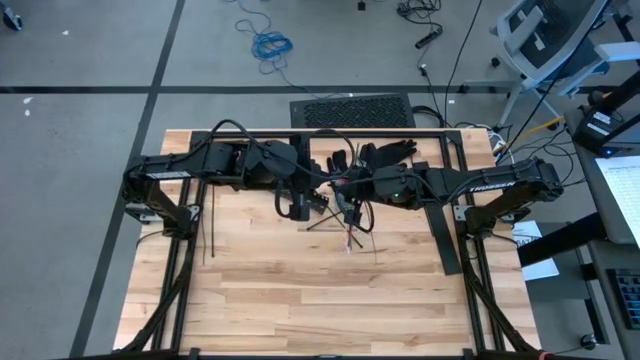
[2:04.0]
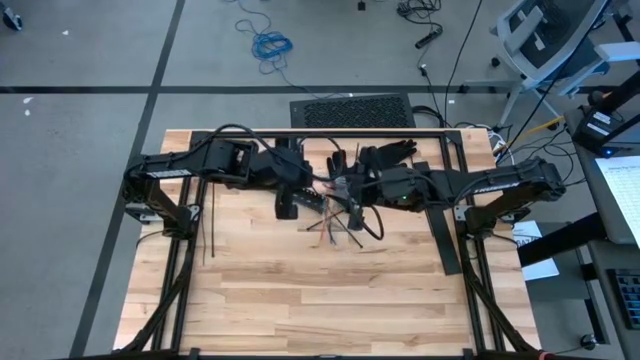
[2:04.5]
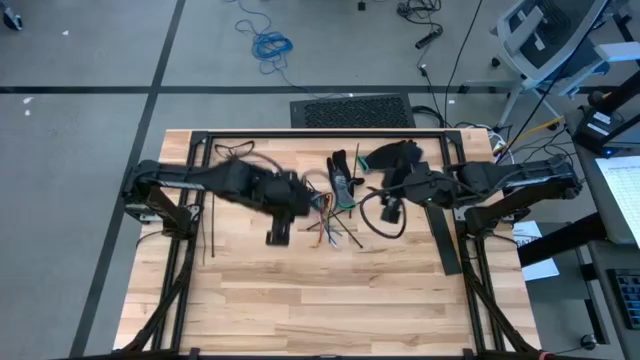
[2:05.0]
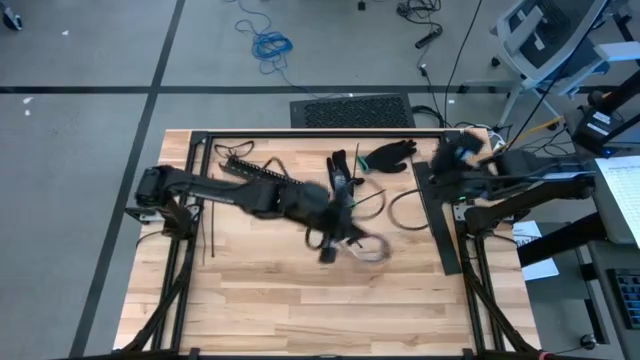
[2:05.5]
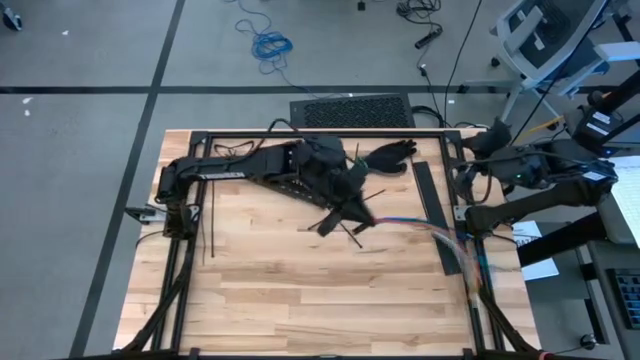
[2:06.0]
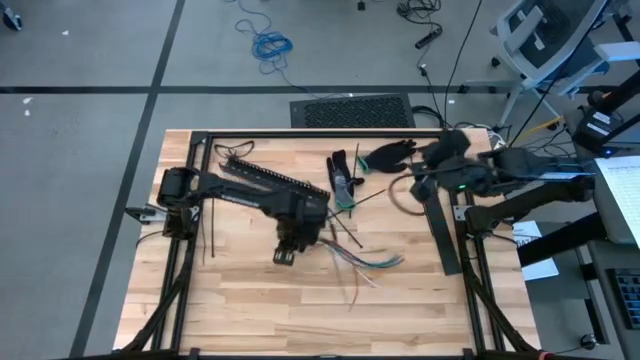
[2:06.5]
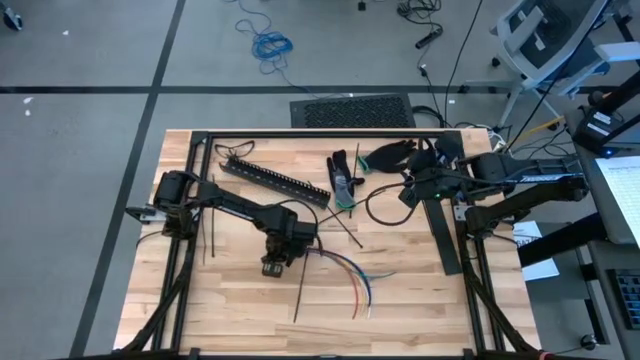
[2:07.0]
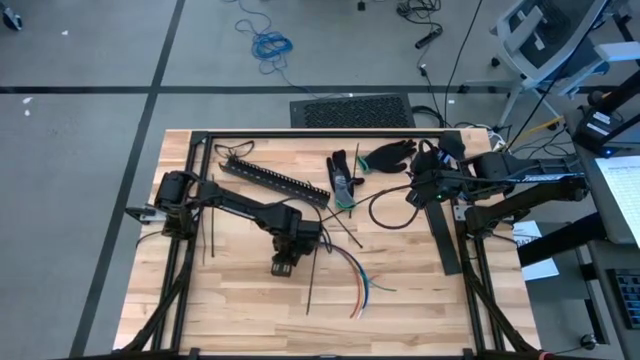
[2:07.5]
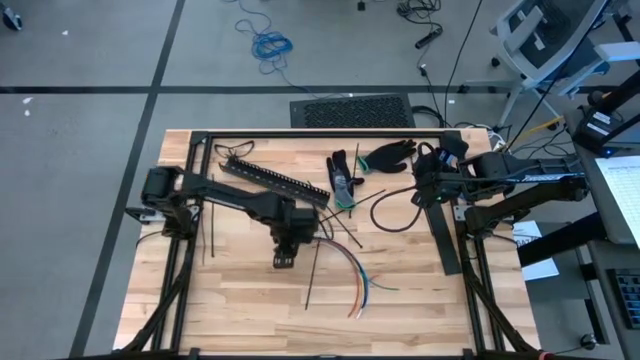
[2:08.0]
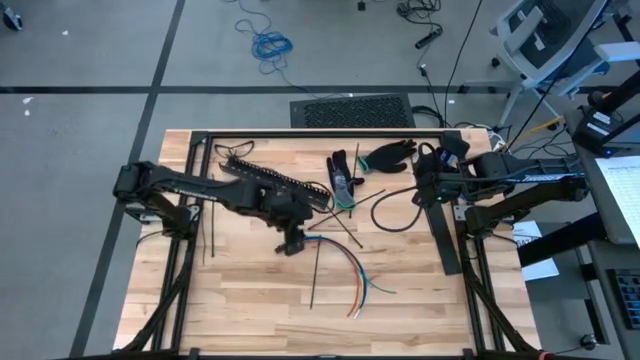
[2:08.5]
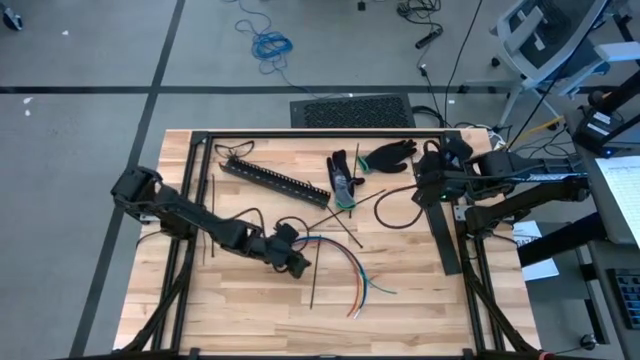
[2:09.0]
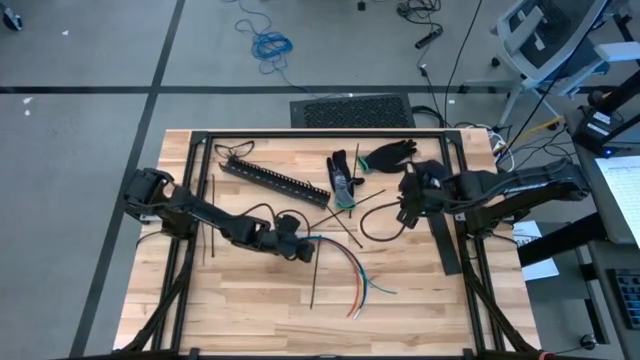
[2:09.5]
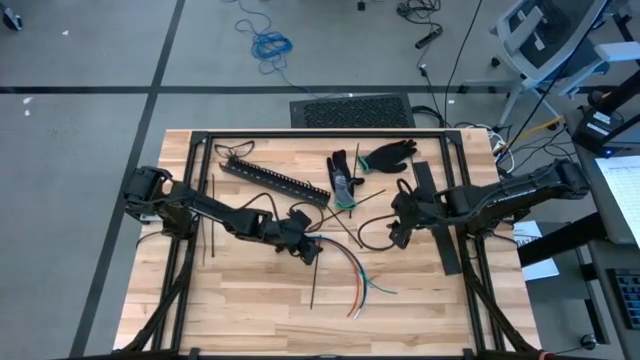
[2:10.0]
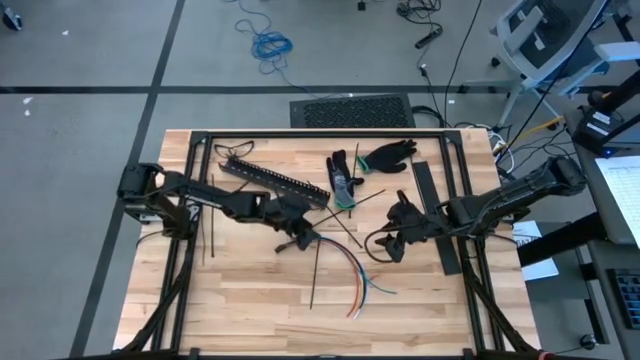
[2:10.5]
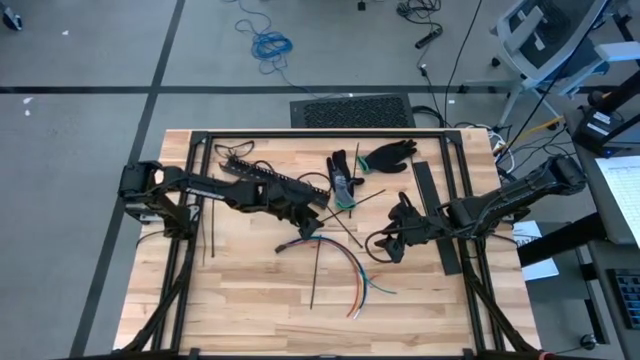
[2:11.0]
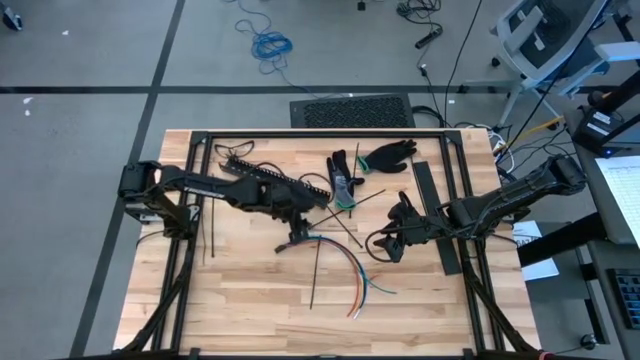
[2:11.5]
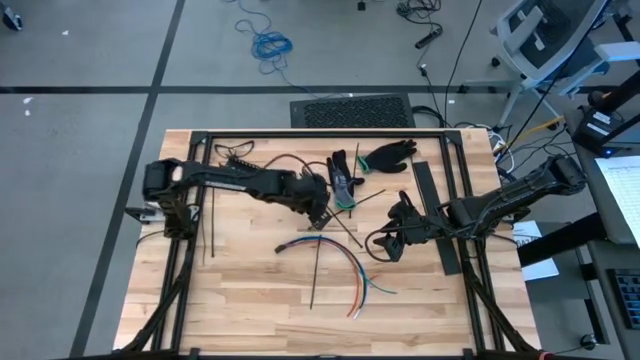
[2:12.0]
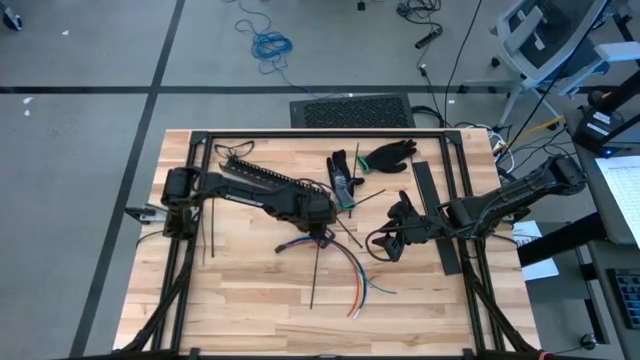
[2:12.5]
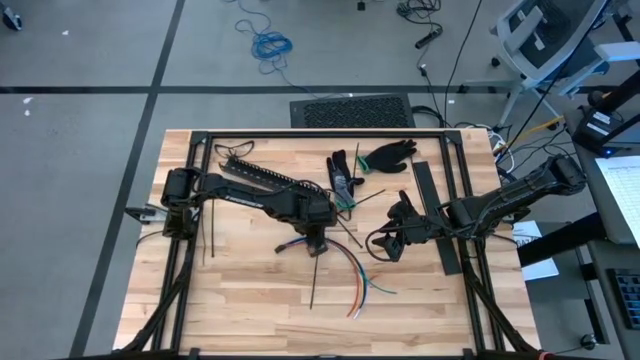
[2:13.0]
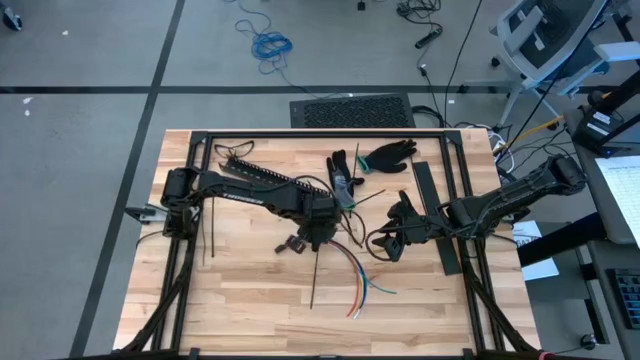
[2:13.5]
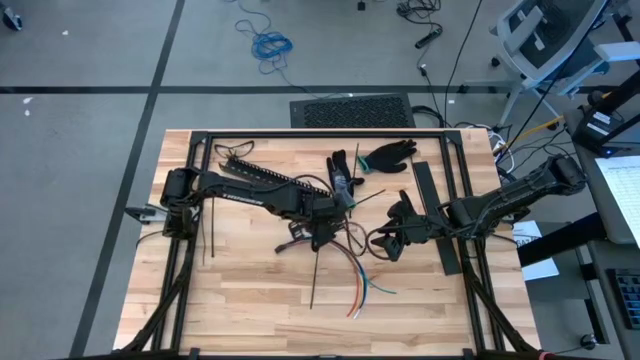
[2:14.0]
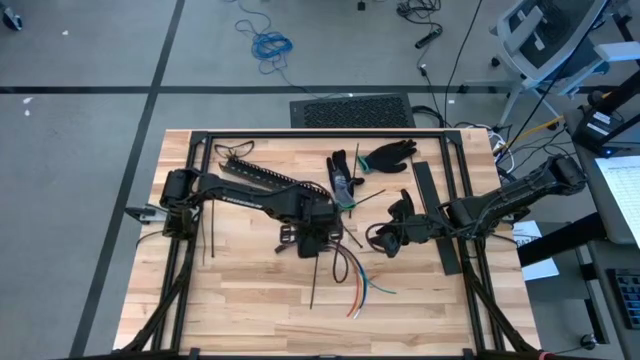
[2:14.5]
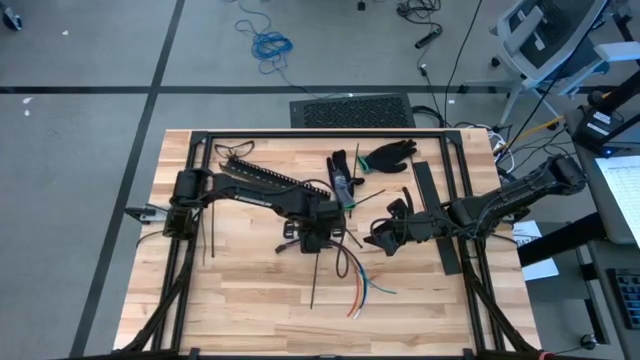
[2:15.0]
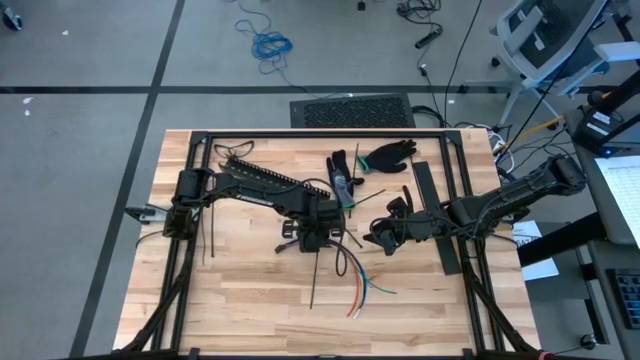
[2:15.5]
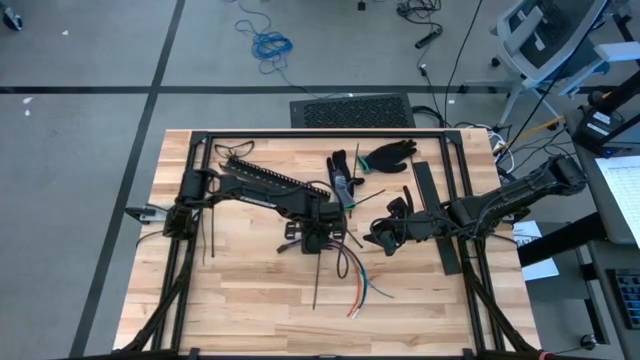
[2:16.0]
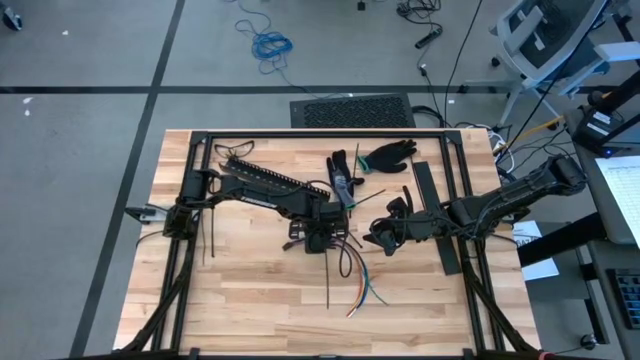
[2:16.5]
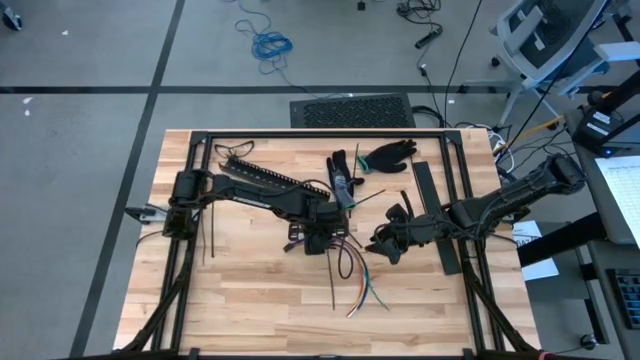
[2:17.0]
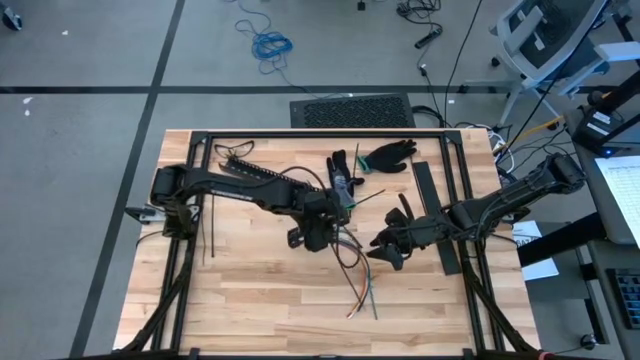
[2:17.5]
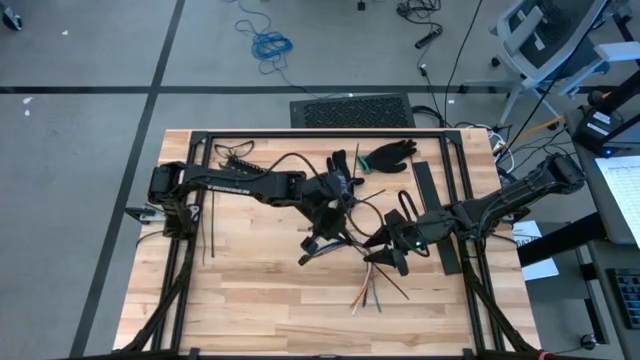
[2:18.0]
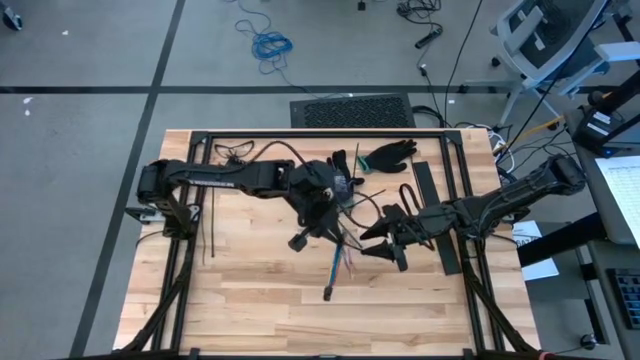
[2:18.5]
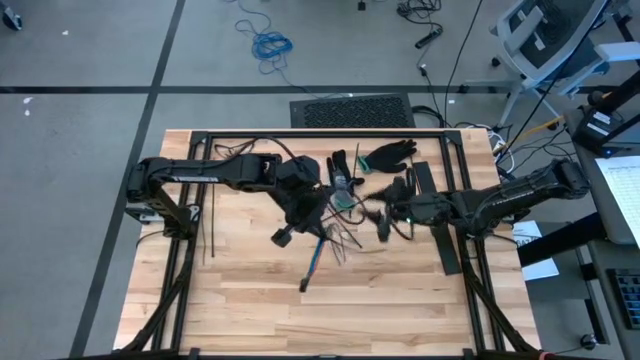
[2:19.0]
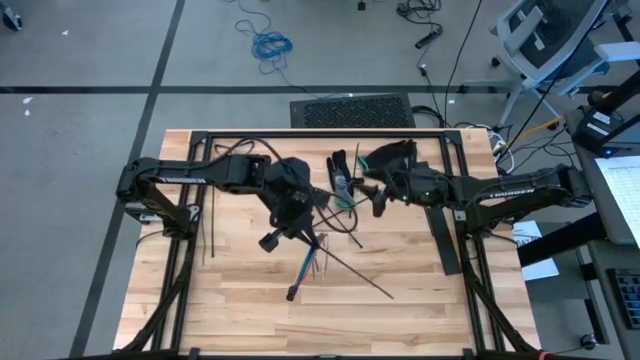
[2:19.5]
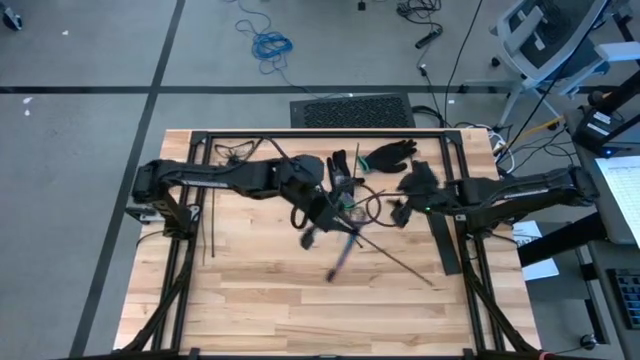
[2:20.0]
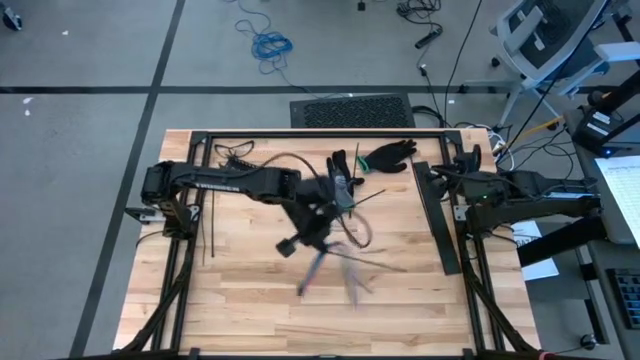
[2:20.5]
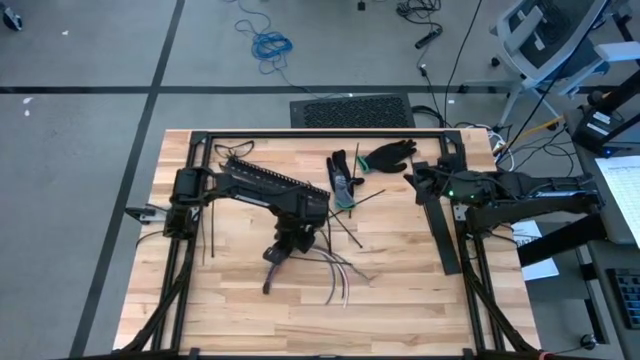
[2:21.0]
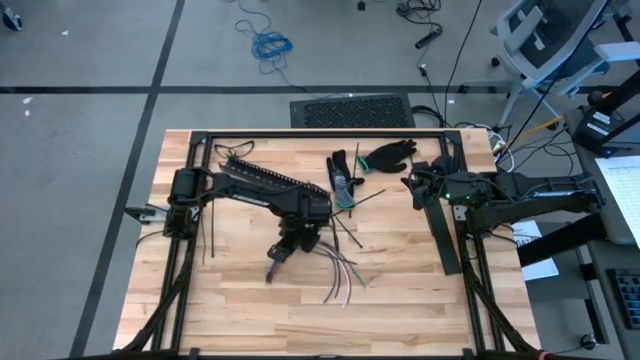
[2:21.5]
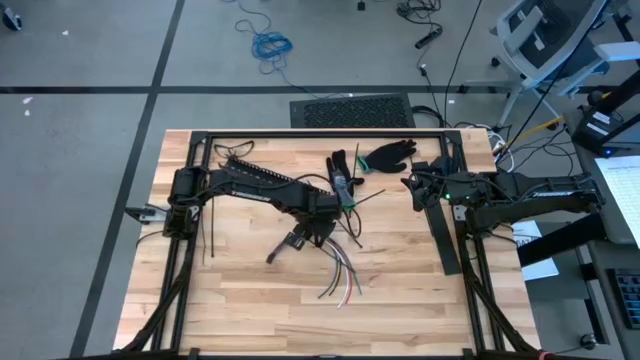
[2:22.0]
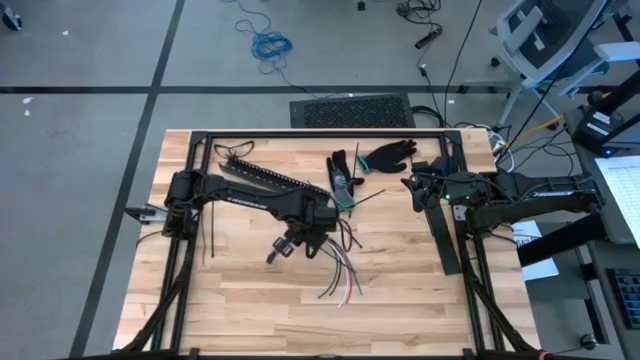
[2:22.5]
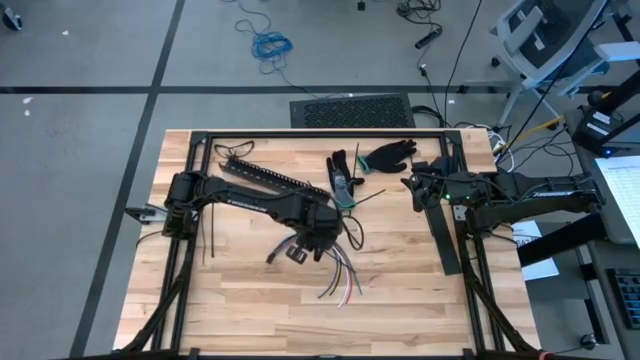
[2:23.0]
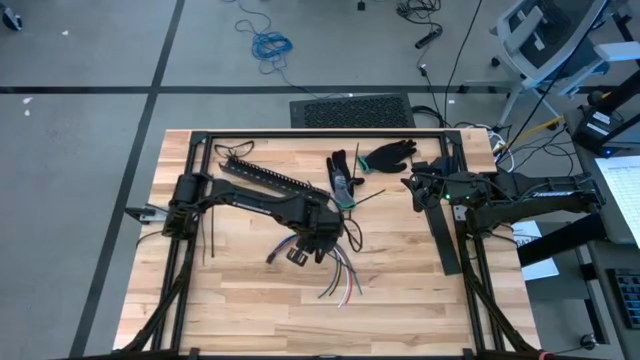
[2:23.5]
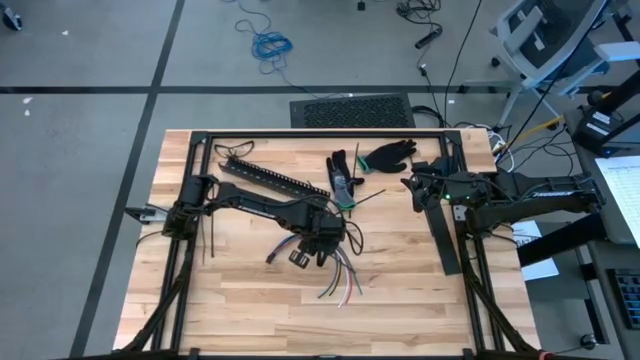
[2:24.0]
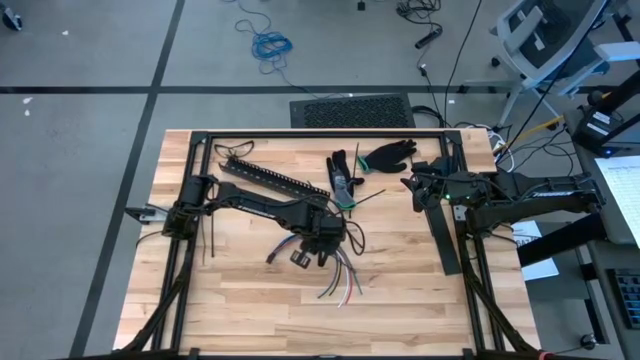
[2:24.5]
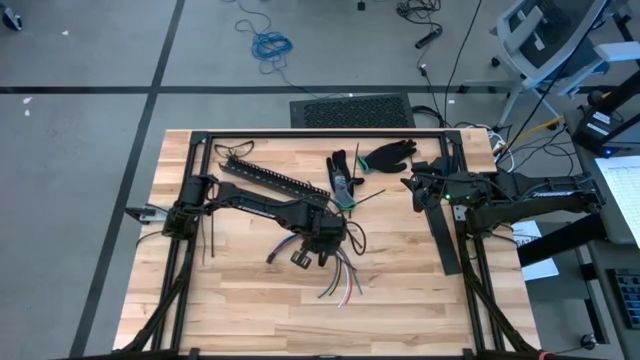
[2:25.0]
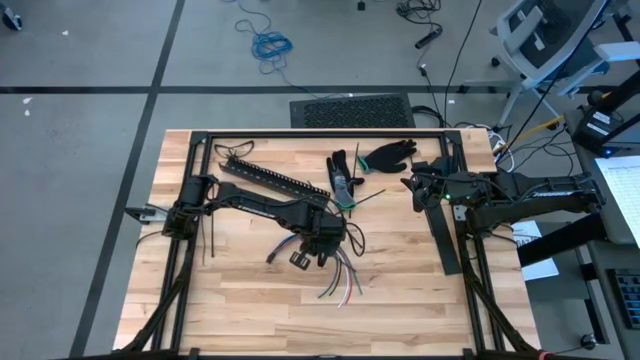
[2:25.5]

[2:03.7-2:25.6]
Task: Ziptie cables
Wrap the cable wires with the black zip tie
